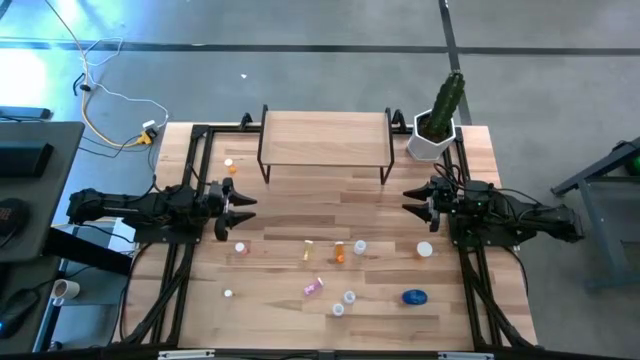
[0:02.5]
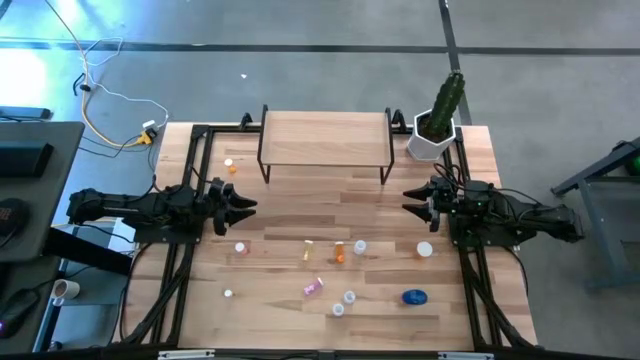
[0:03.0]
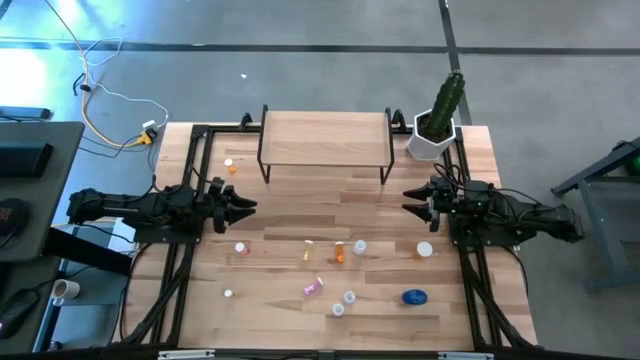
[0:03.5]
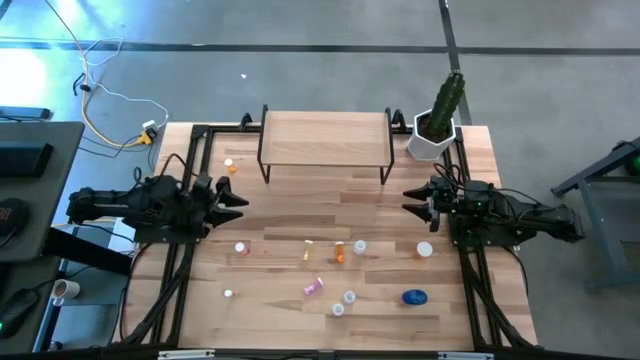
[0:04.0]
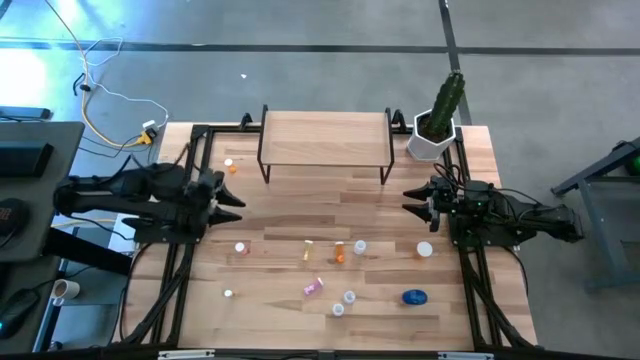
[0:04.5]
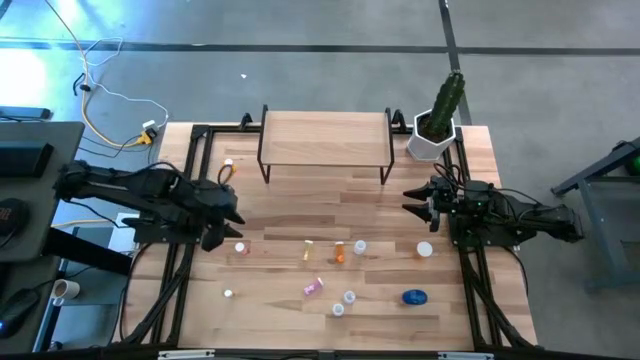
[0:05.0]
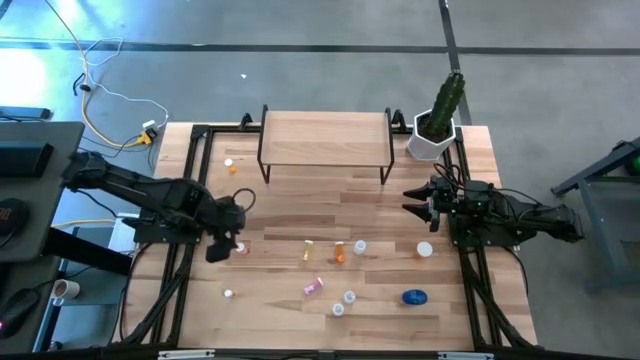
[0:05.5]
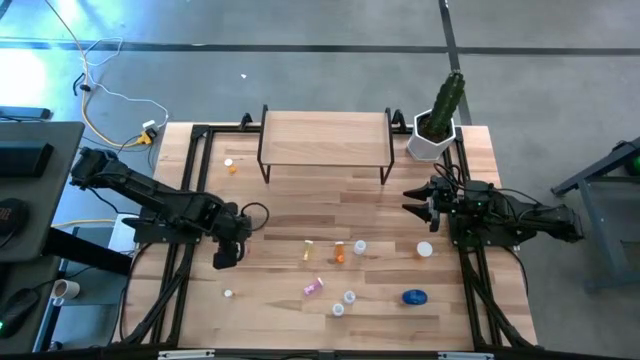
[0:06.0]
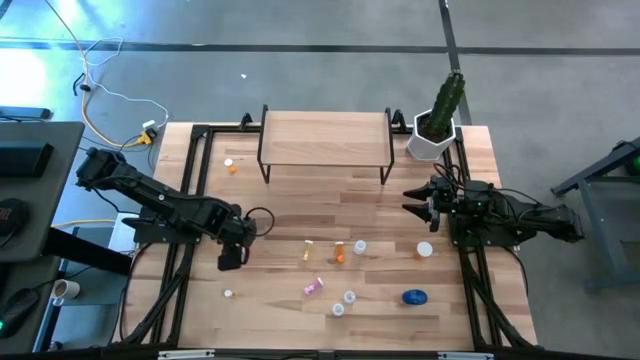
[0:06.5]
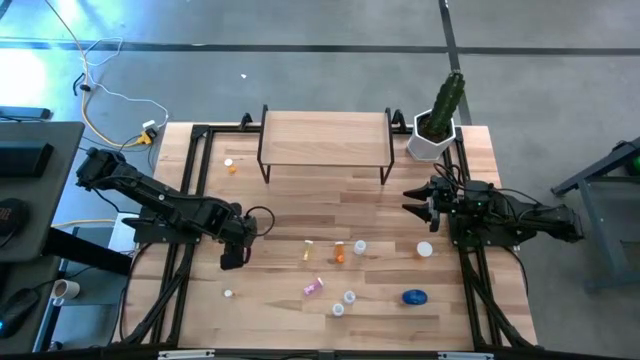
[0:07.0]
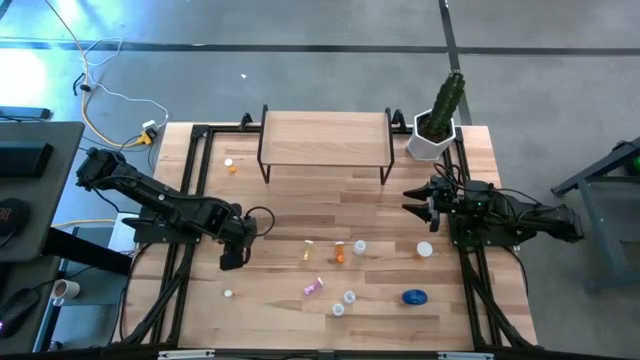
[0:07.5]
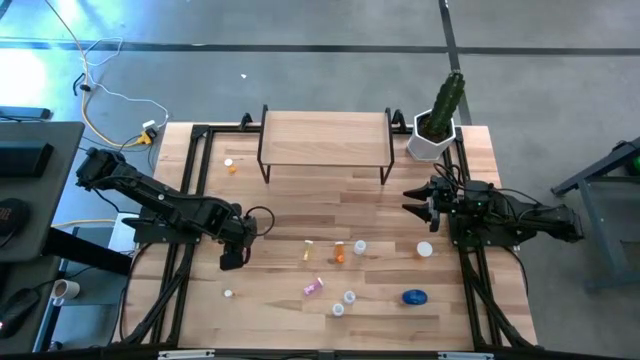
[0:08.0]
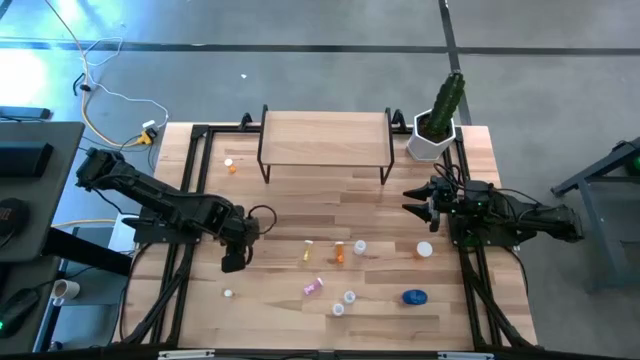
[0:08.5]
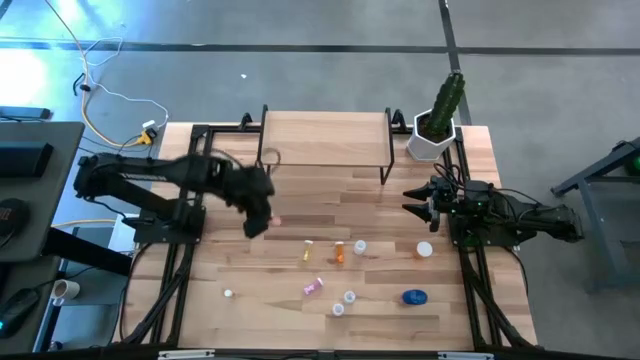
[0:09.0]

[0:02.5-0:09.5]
Task: Pick and place medicine bottles onto shelf by color
Put the left pink medicine bottle on the shelf

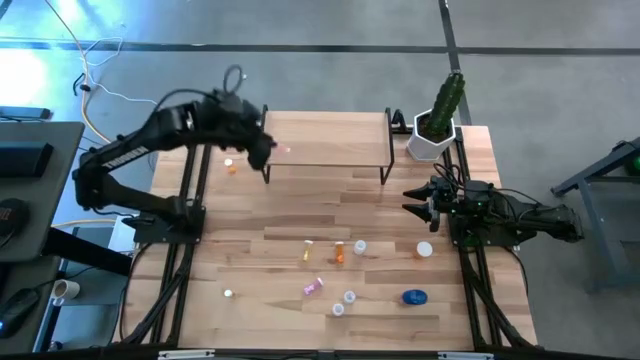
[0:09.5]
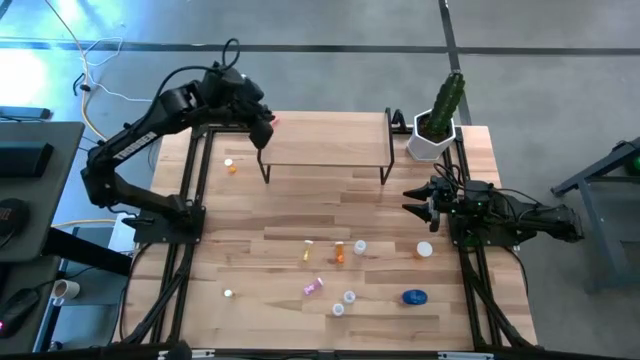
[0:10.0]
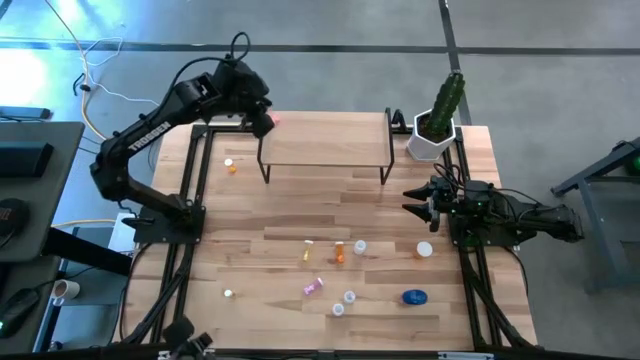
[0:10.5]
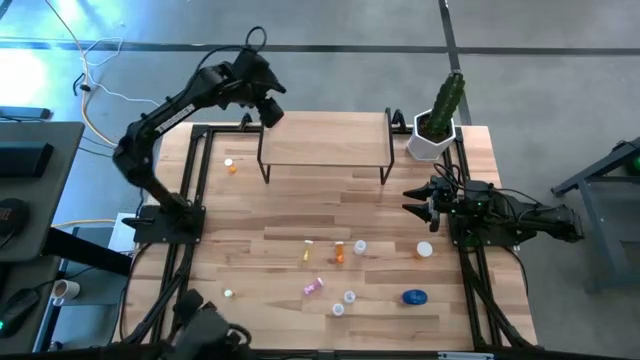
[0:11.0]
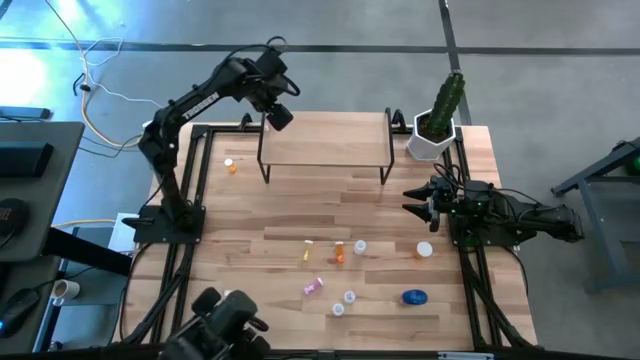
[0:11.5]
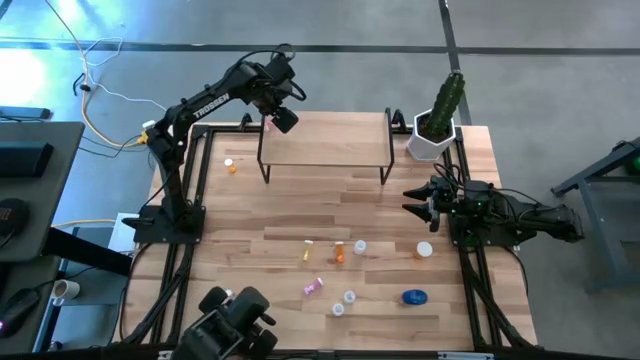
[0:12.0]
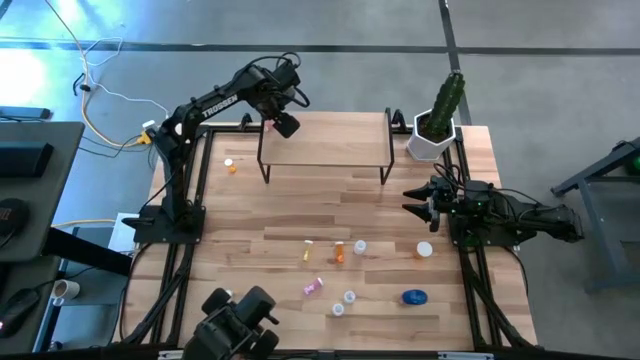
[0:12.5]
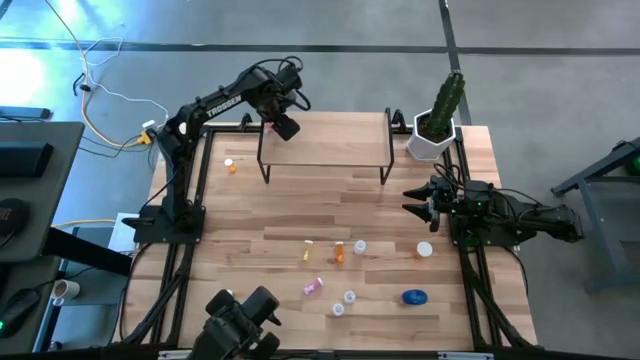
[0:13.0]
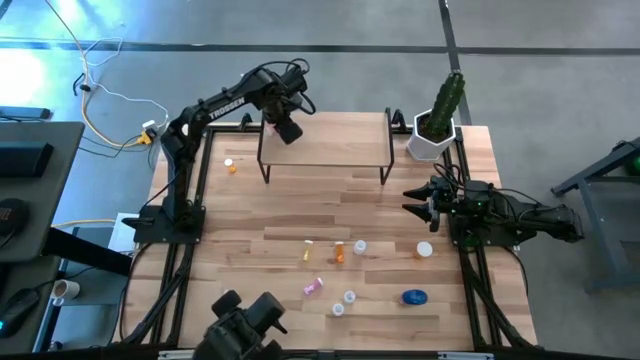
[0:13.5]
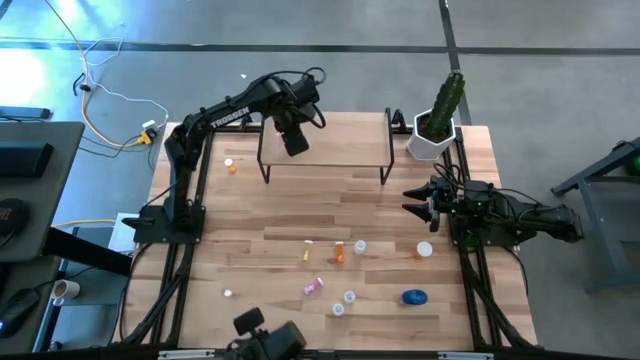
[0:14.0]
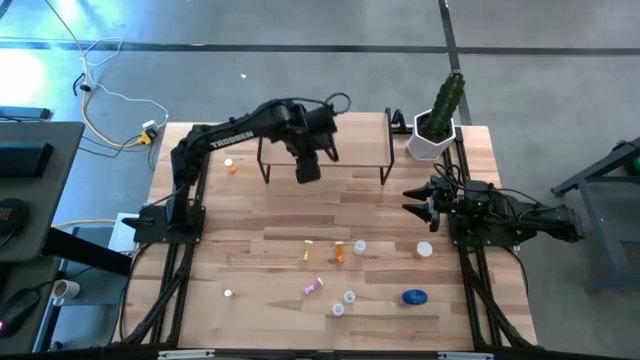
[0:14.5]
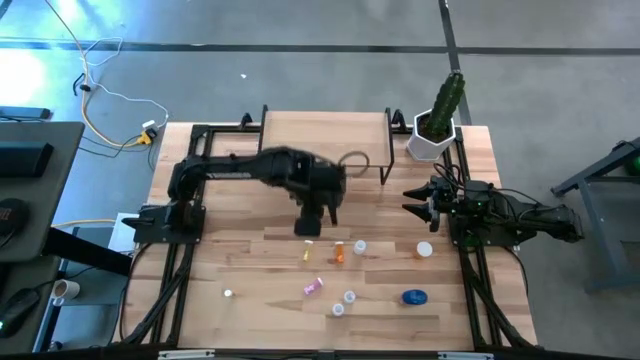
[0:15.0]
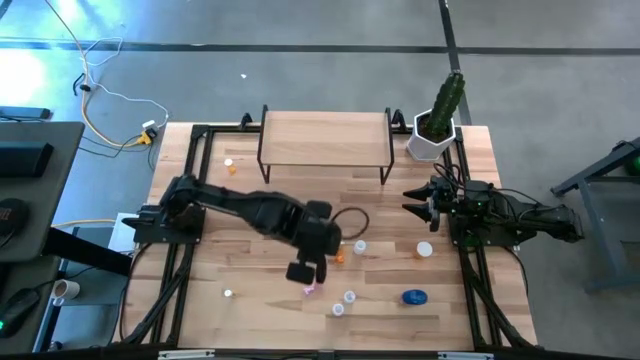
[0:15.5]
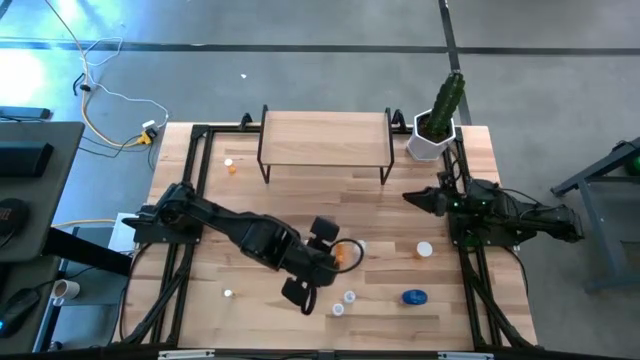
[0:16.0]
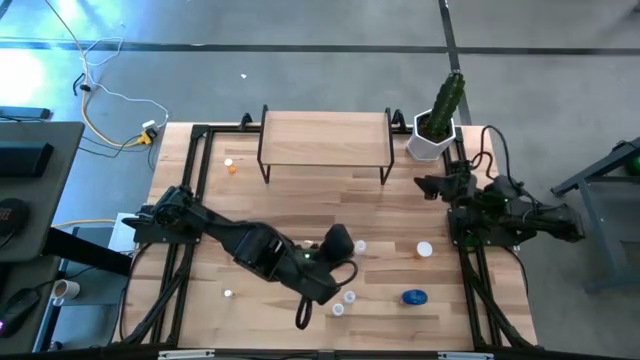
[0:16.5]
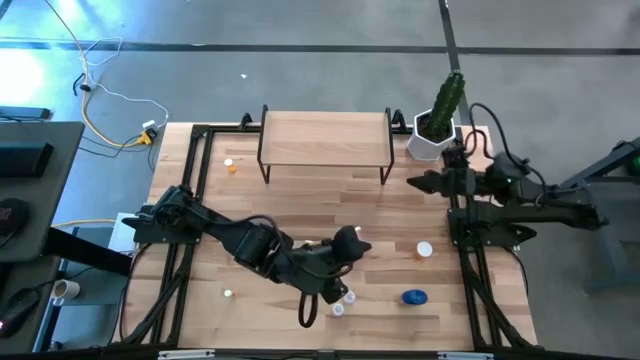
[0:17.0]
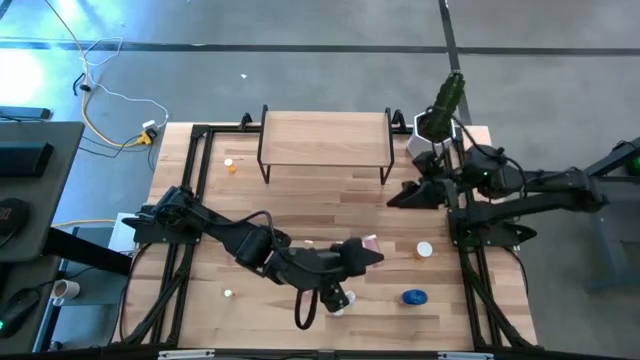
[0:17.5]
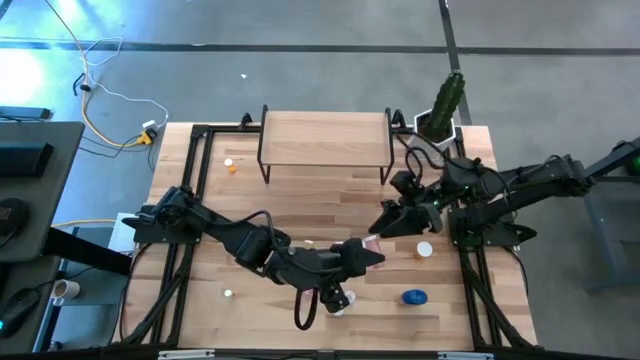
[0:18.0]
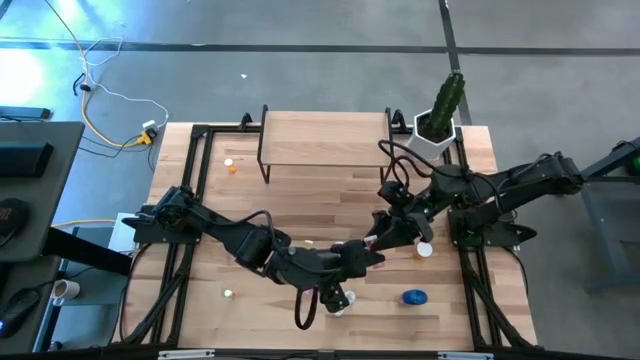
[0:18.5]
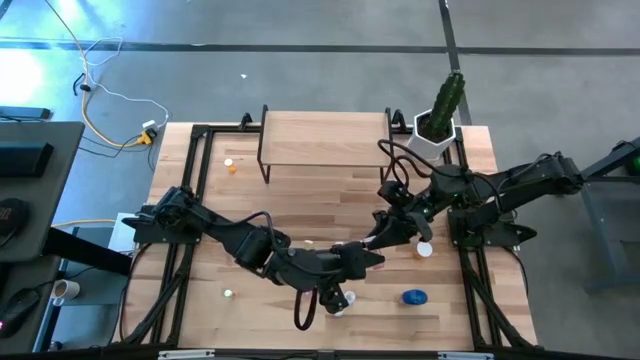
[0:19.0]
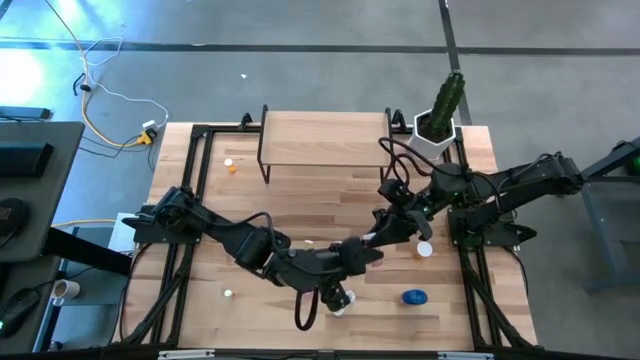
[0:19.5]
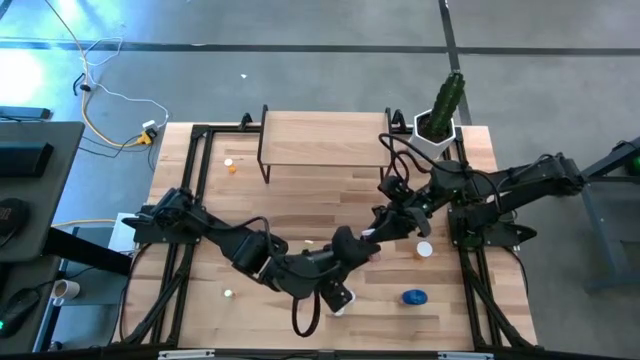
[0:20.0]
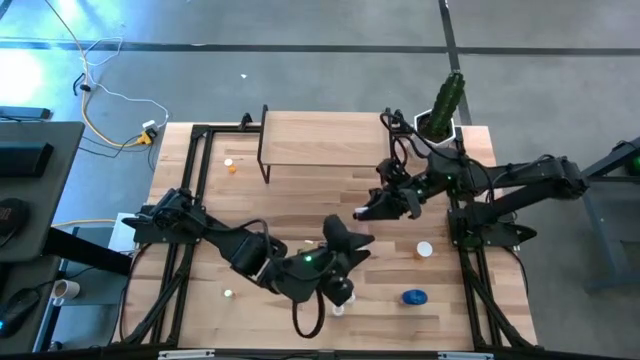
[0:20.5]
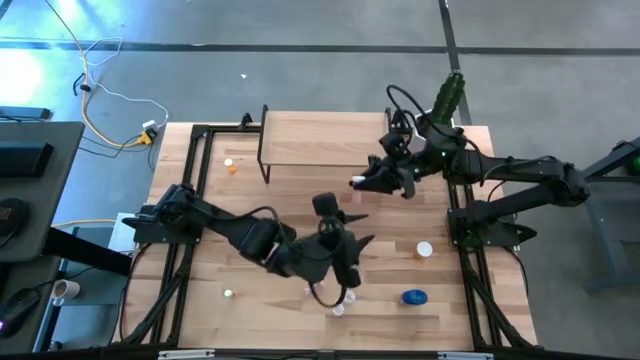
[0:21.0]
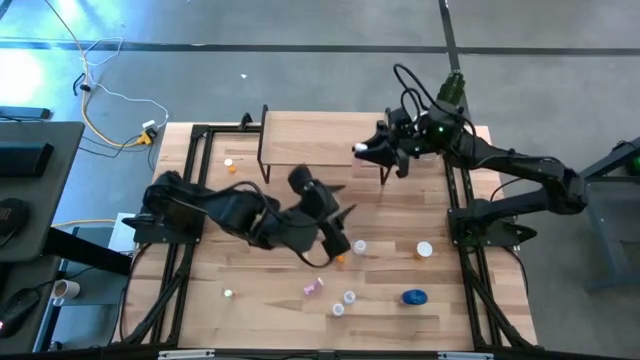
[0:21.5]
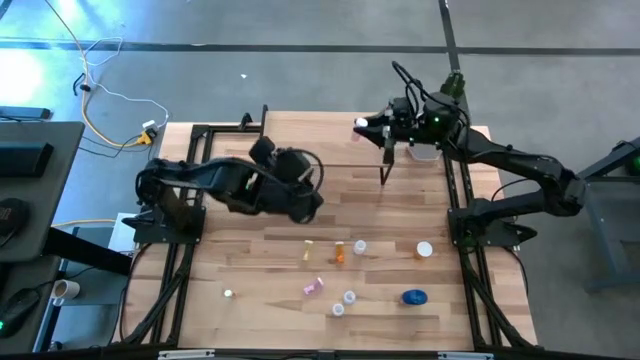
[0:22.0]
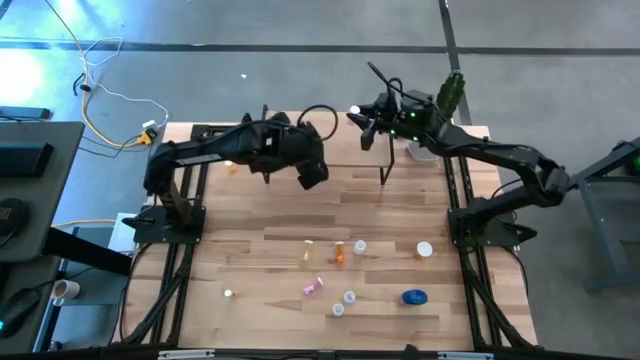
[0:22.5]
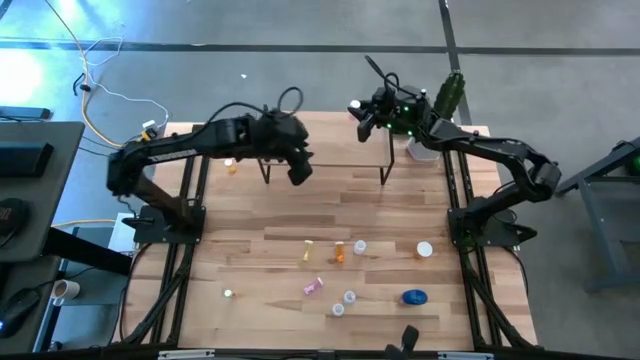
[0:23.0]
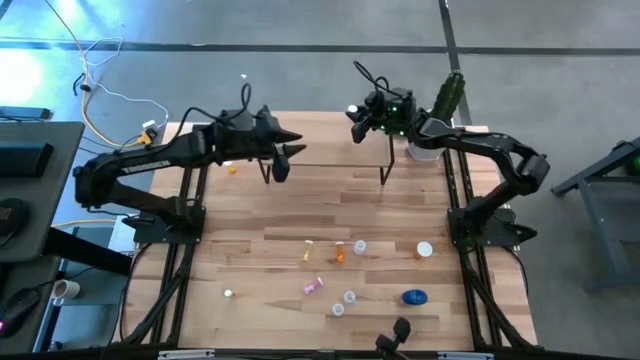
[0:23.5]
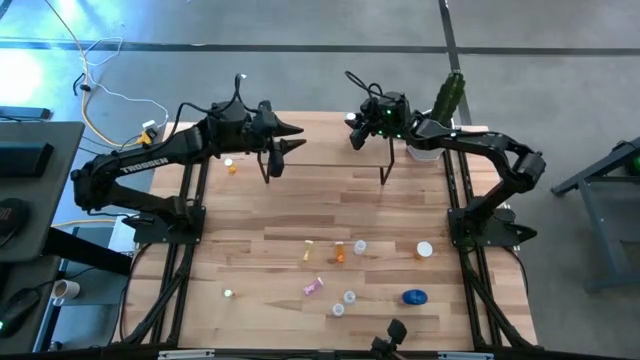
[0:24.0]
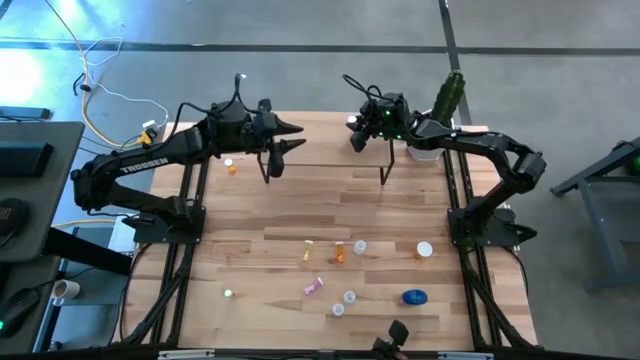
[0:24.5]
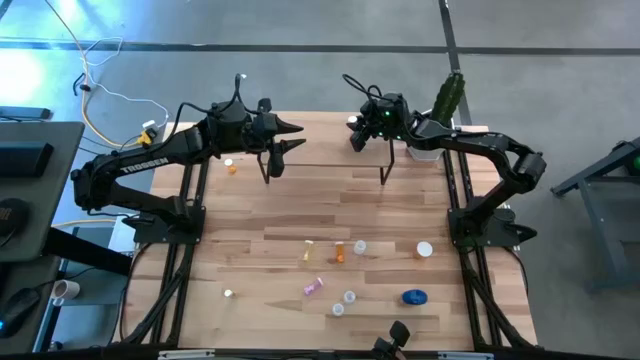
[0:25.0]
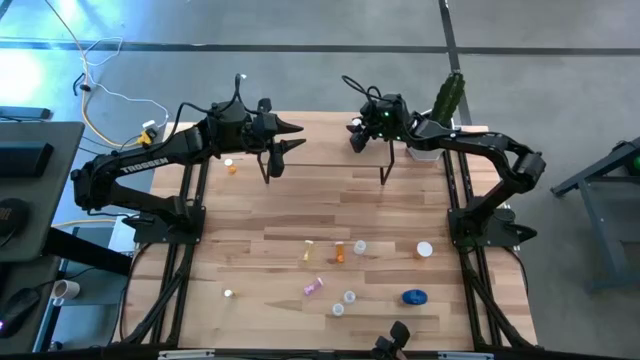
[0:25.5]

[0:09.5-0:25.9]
Put the left pink medicine bottle on the shelf
